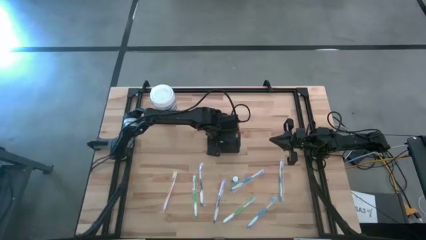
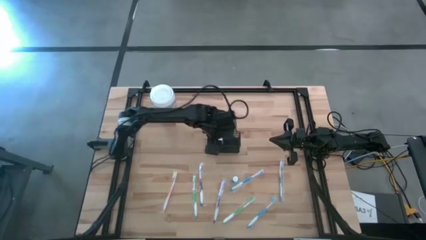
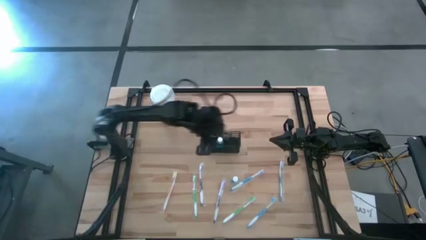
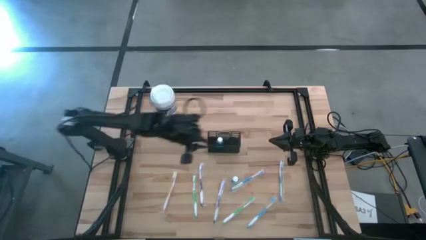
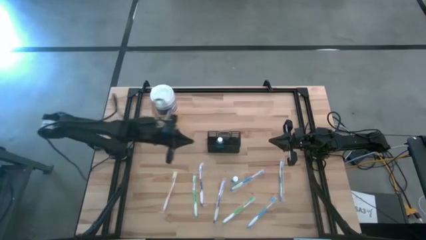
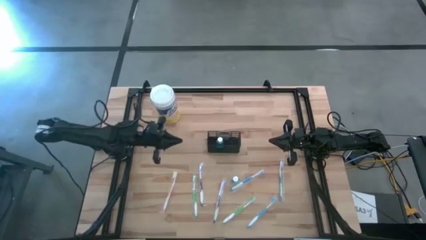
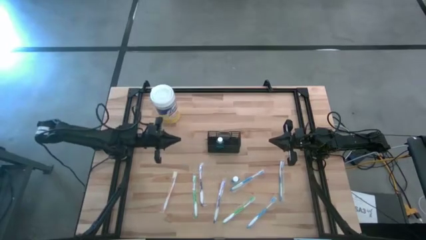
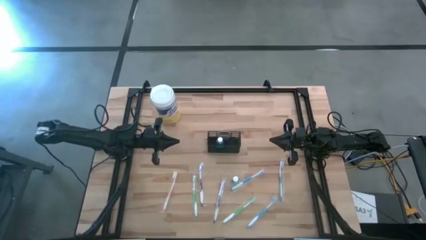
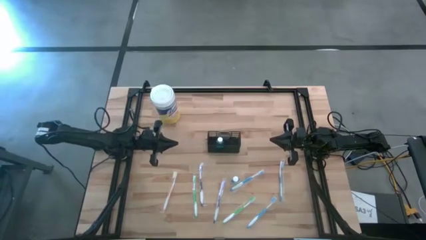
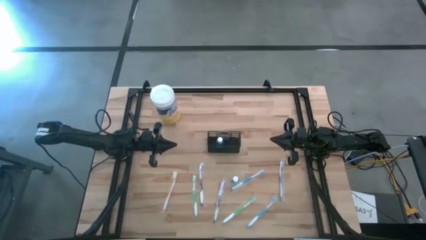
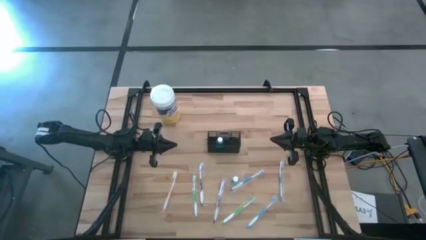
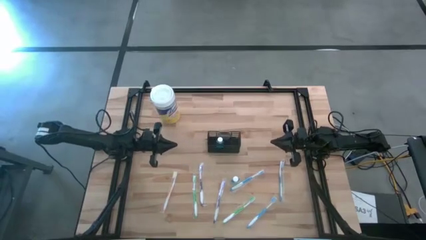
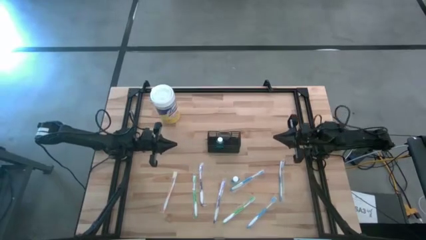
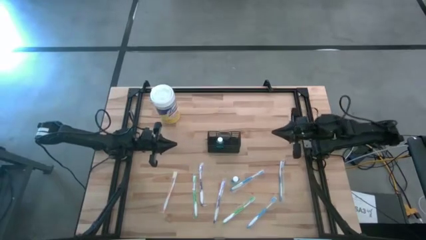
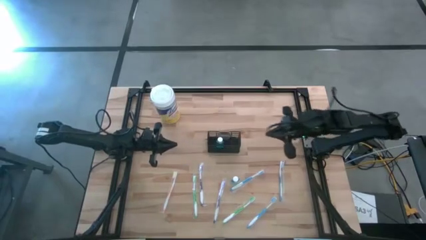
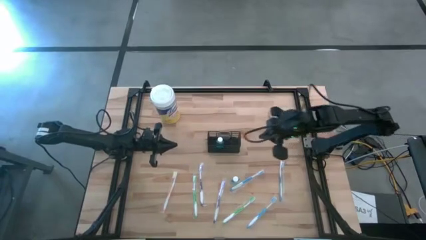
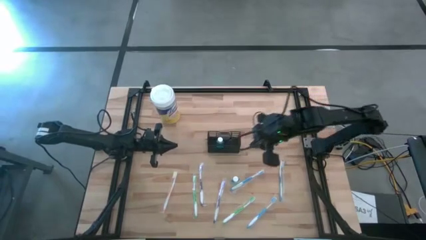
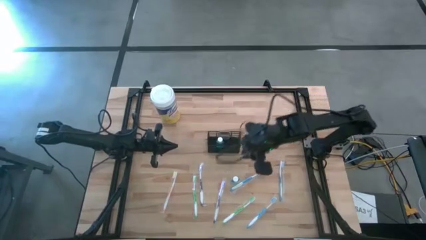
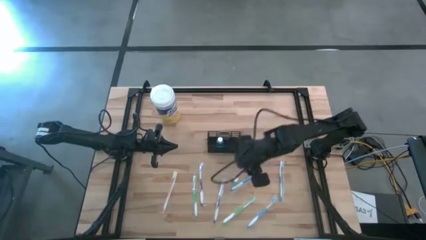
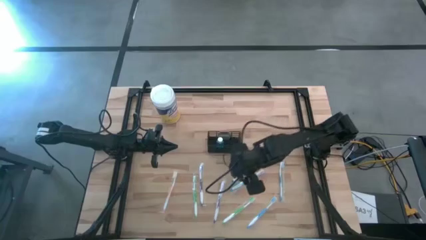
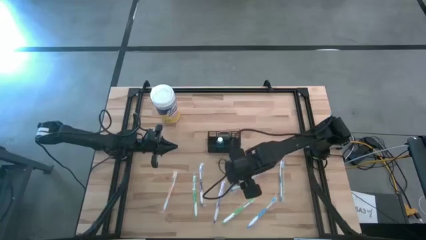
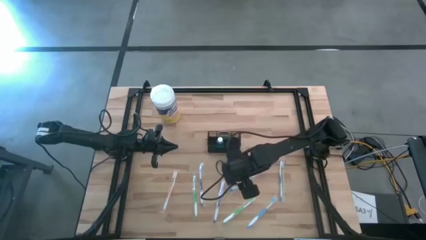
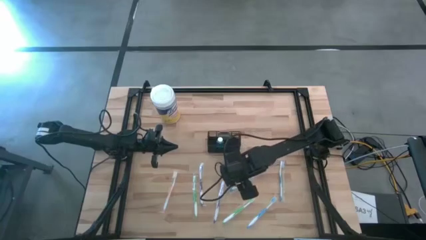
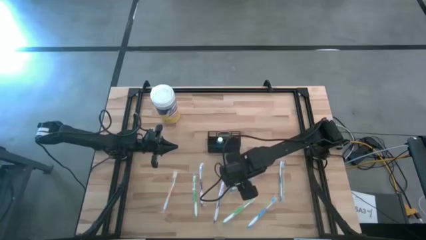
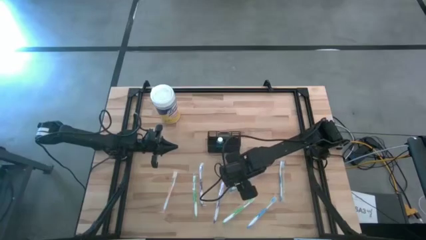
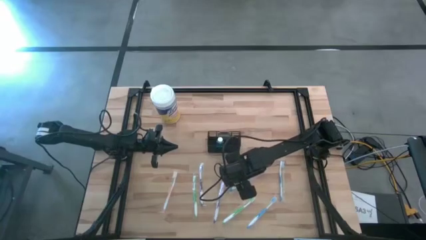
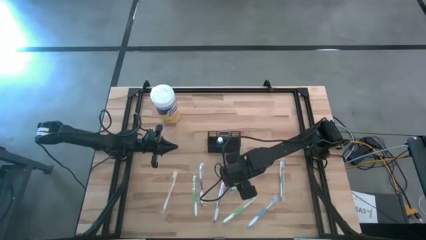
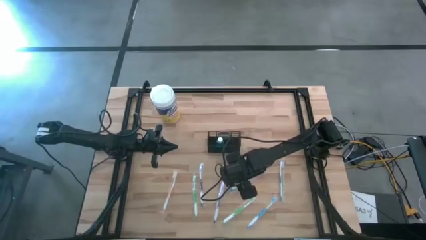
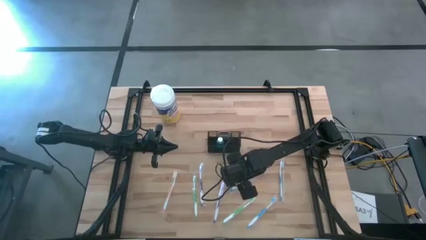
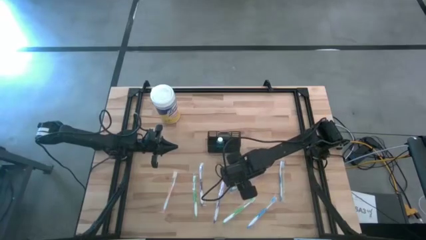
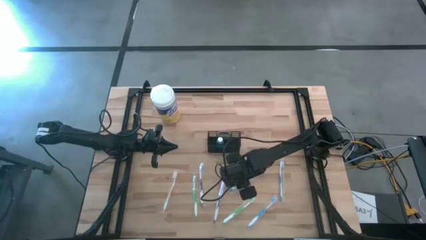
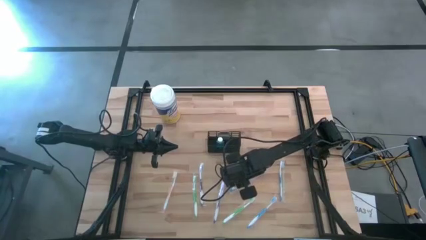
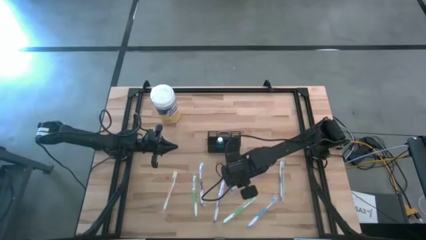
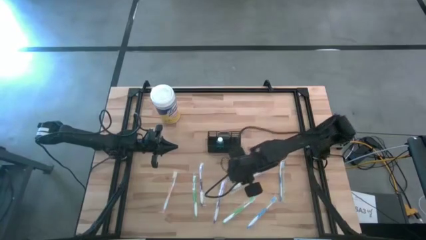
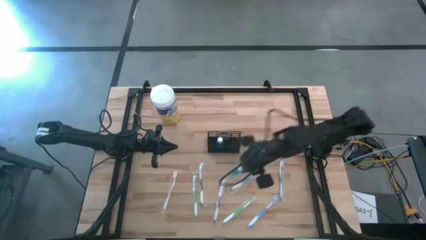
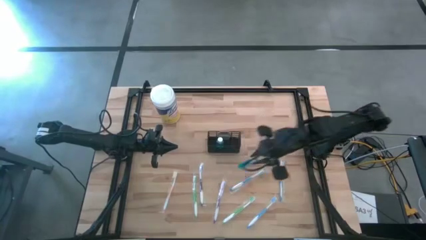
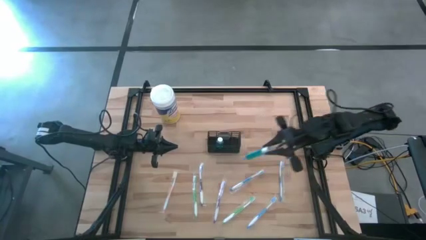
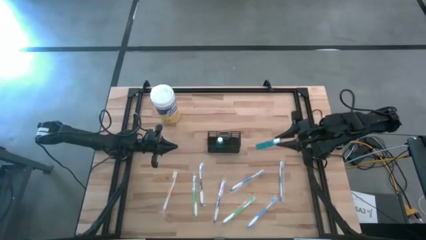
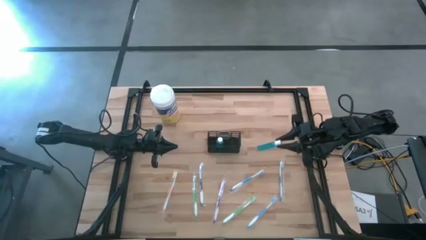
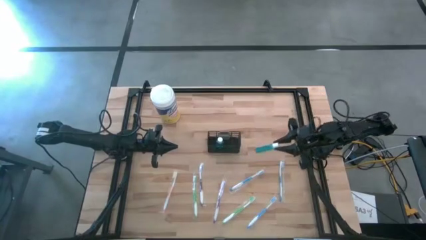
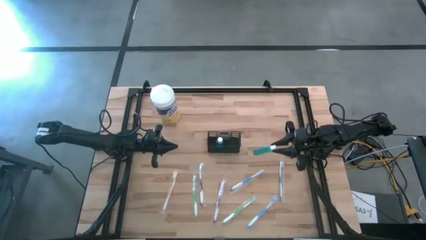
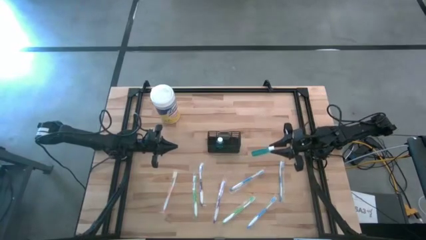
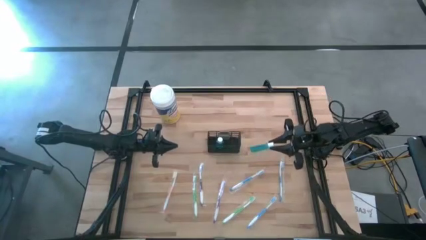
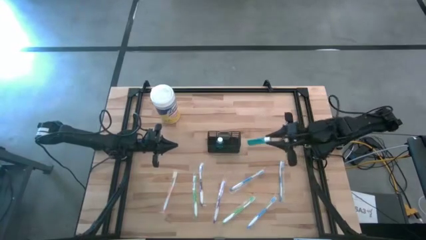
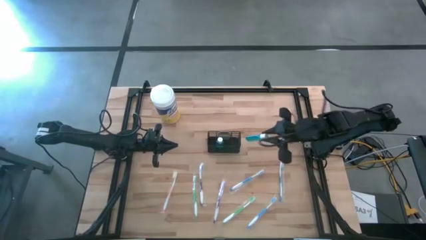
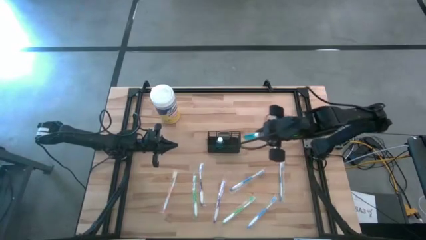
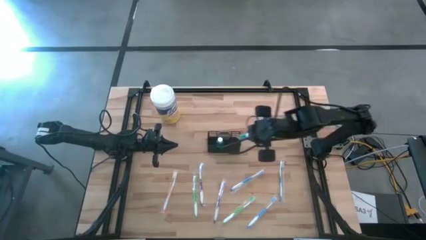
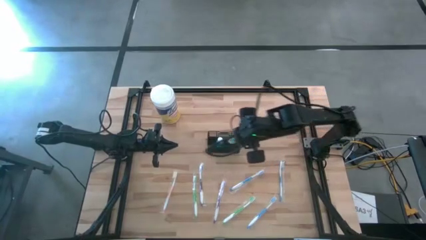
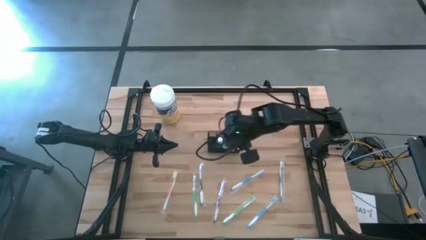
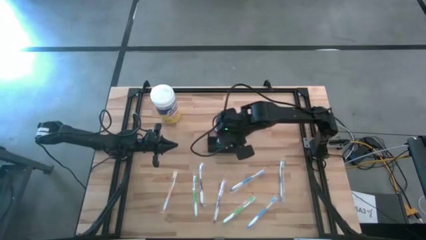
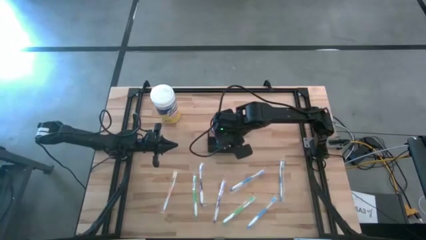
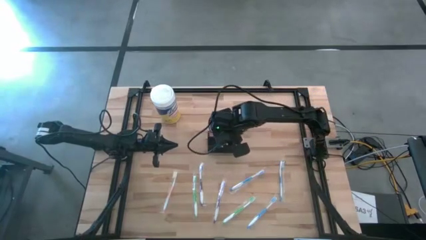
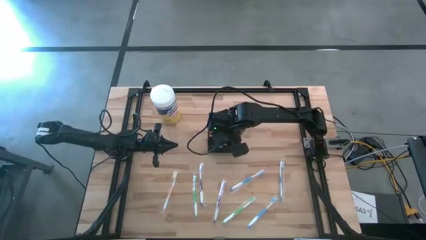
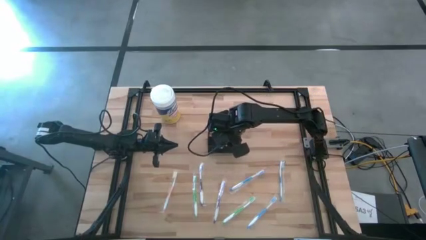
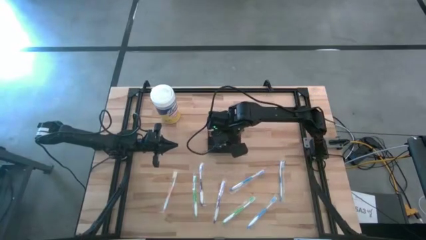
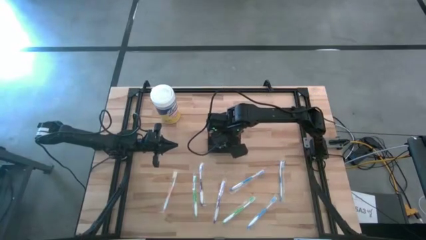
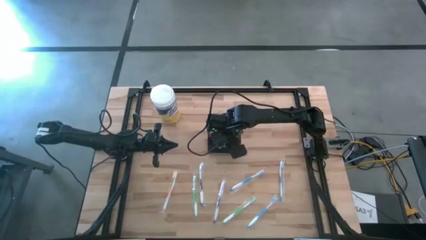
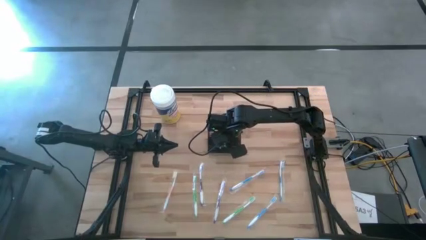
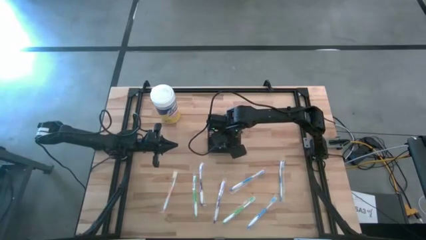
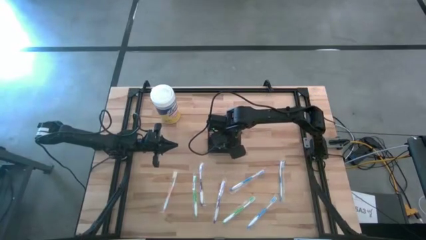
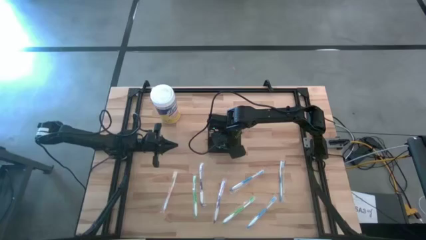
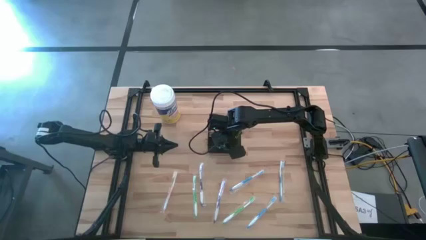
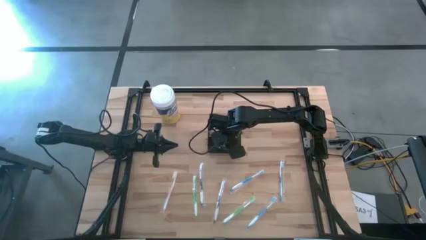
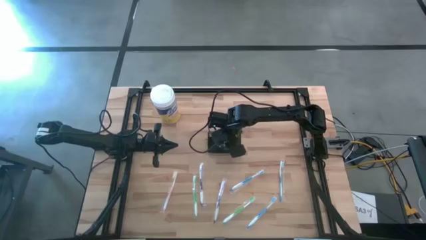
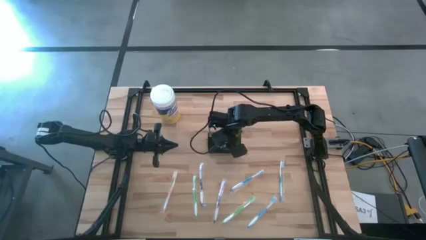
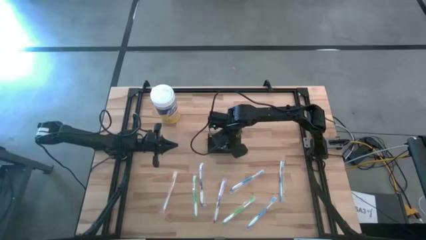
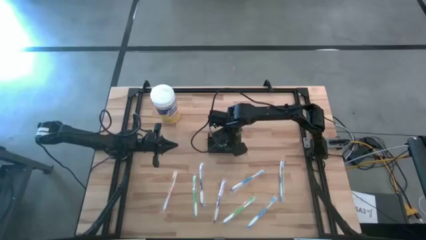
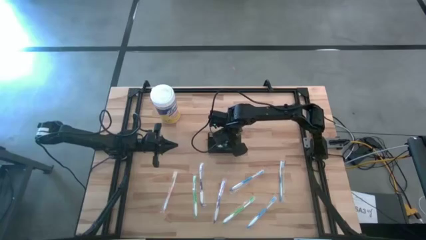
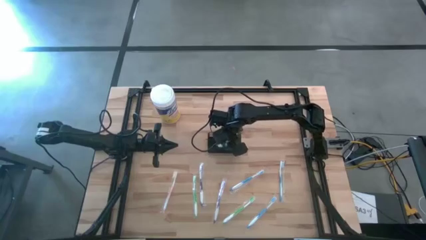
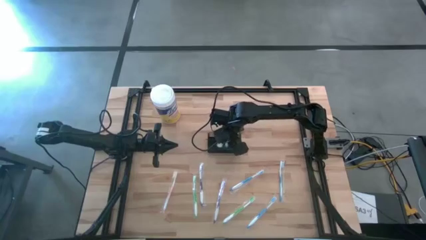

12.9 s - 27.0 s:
Task: Pick & Place toothbrushing station
Put the mouthwash into the black mesh organizer
